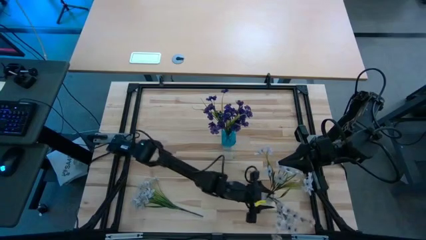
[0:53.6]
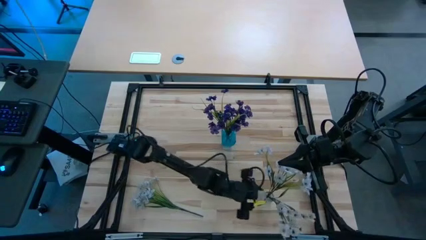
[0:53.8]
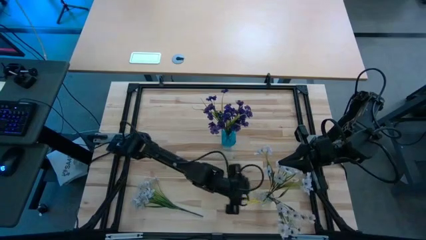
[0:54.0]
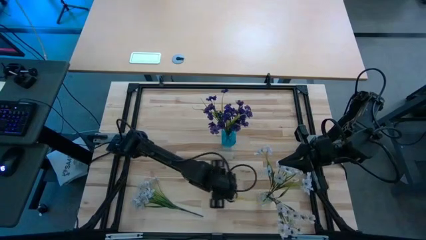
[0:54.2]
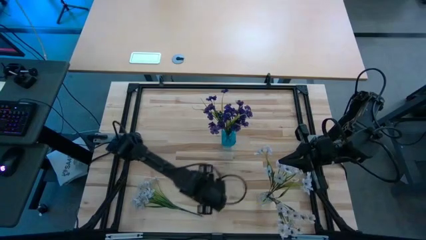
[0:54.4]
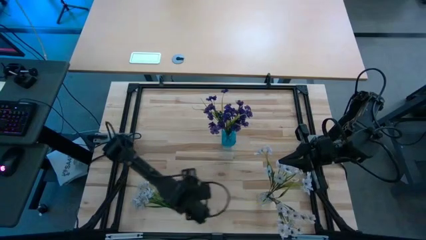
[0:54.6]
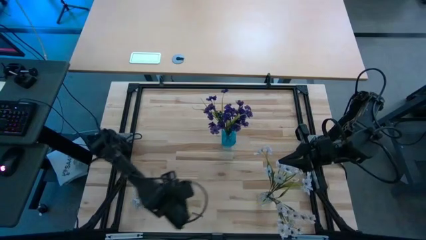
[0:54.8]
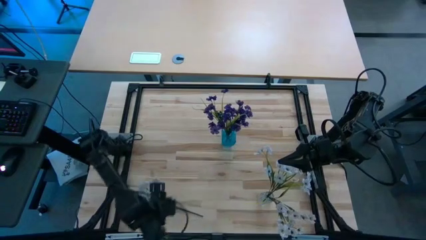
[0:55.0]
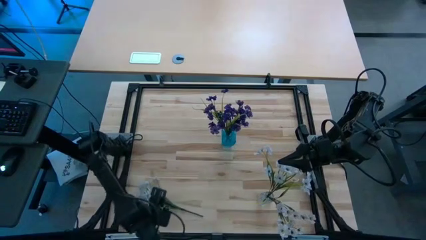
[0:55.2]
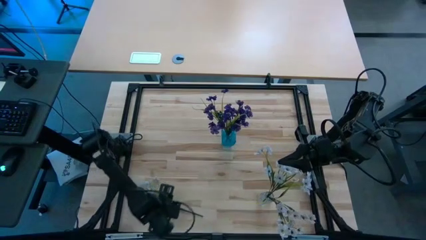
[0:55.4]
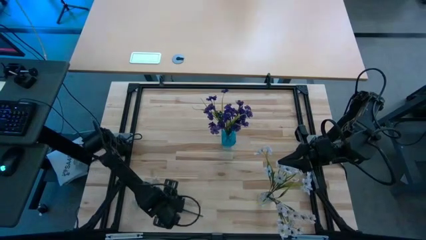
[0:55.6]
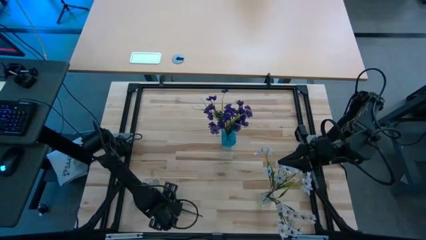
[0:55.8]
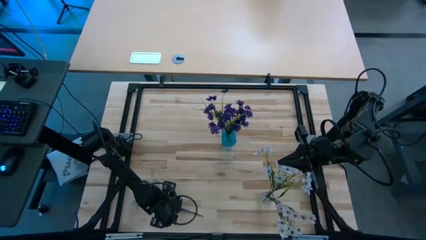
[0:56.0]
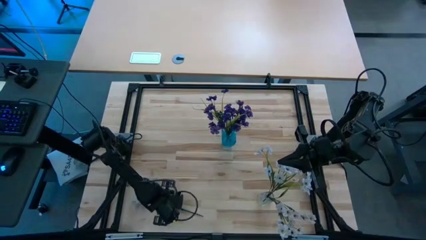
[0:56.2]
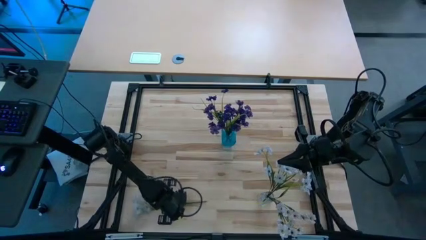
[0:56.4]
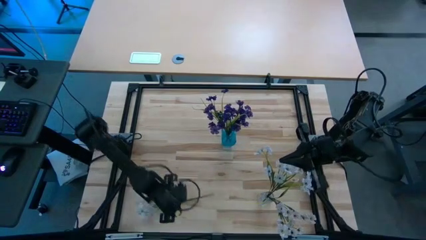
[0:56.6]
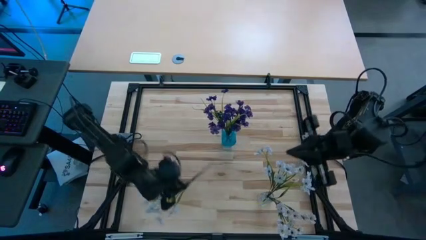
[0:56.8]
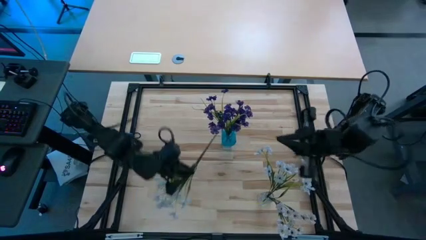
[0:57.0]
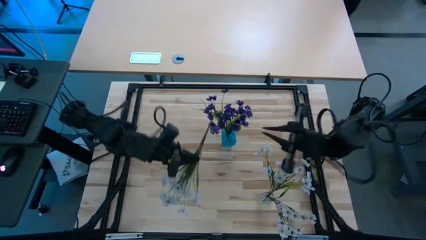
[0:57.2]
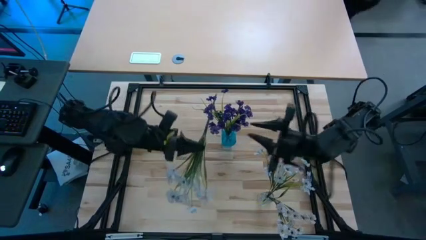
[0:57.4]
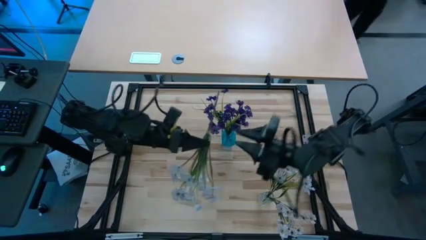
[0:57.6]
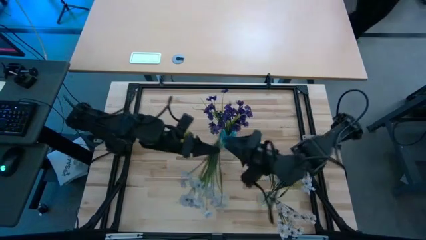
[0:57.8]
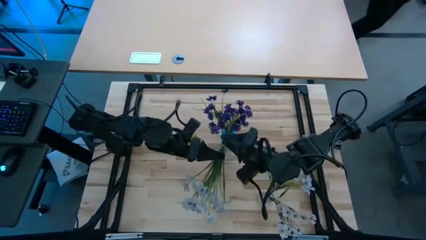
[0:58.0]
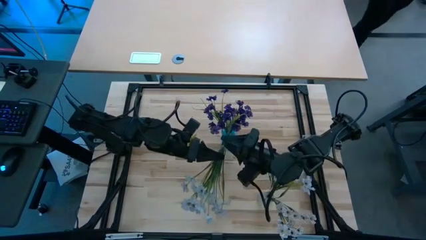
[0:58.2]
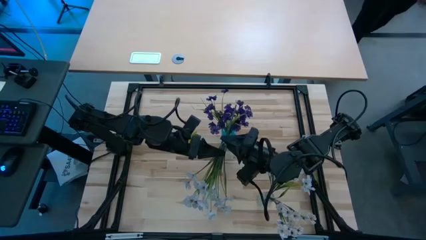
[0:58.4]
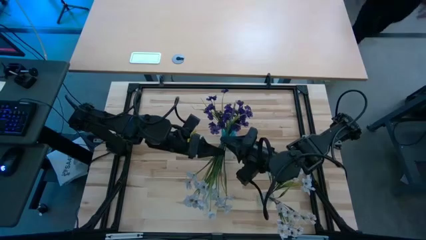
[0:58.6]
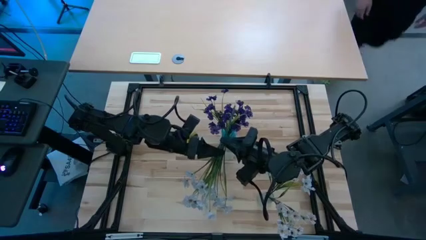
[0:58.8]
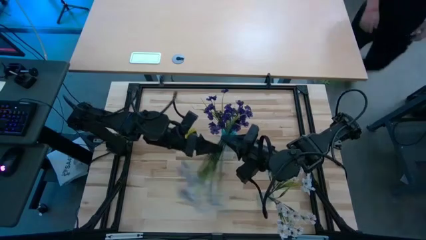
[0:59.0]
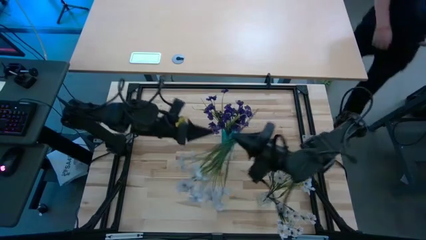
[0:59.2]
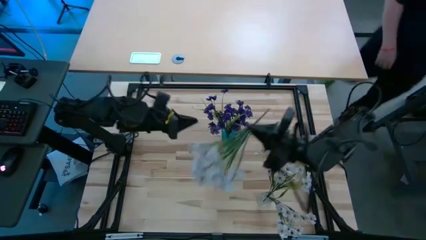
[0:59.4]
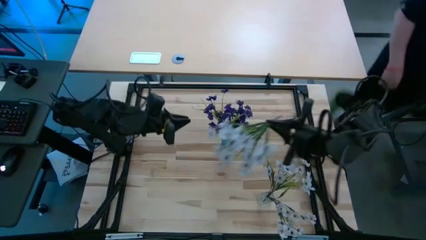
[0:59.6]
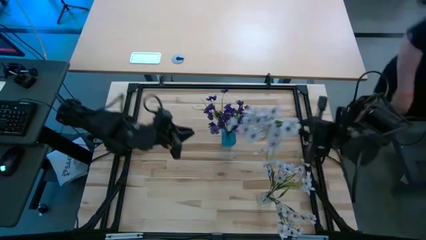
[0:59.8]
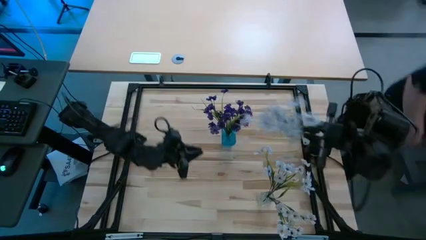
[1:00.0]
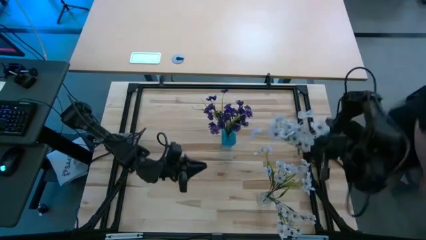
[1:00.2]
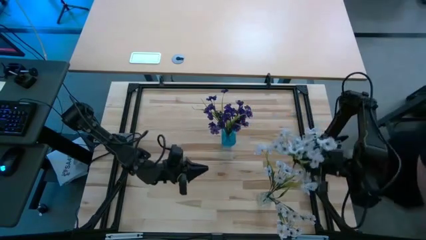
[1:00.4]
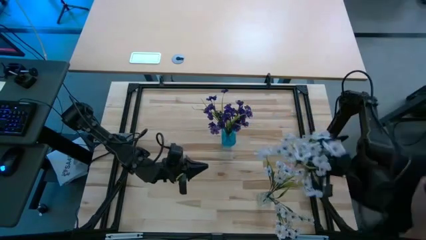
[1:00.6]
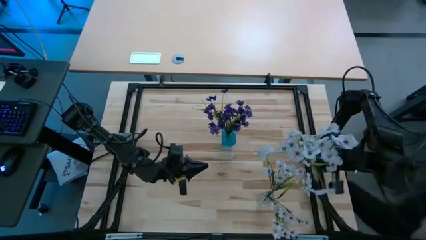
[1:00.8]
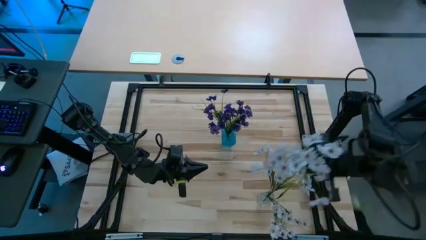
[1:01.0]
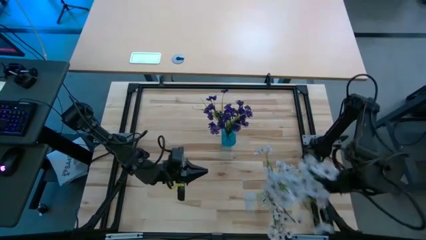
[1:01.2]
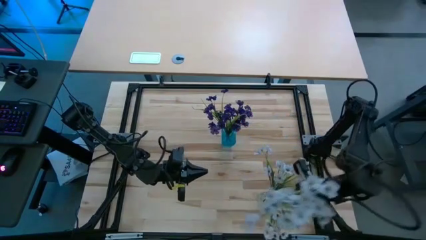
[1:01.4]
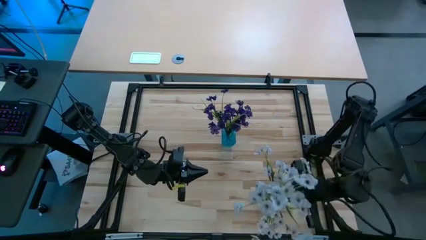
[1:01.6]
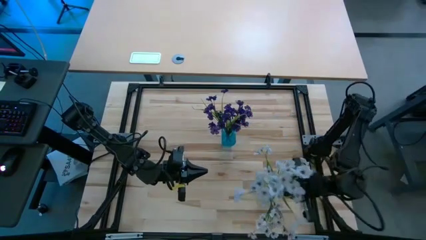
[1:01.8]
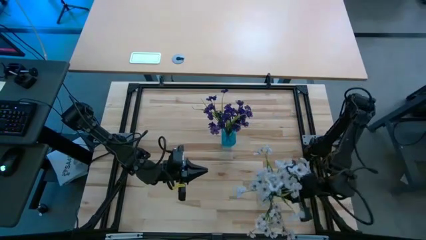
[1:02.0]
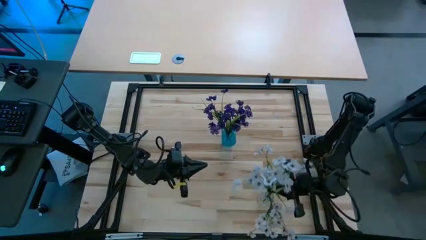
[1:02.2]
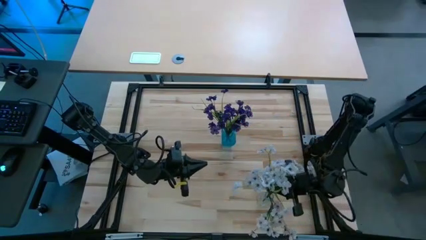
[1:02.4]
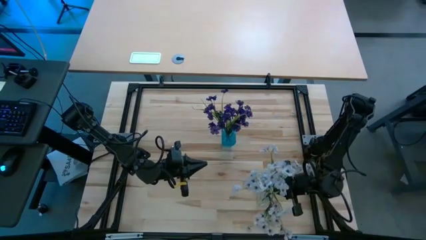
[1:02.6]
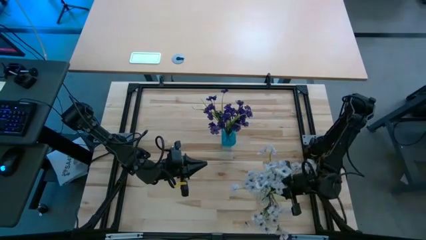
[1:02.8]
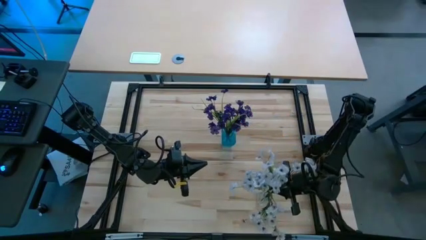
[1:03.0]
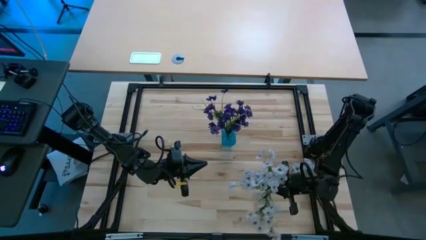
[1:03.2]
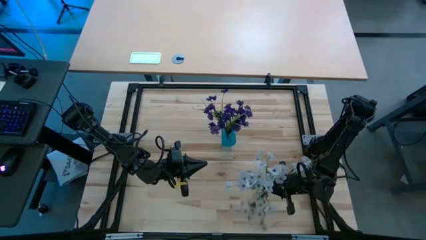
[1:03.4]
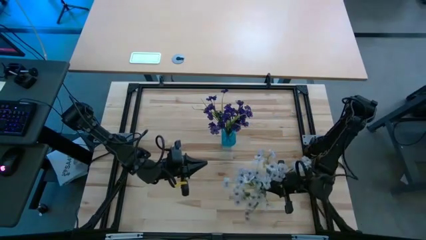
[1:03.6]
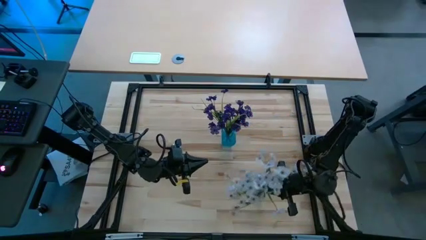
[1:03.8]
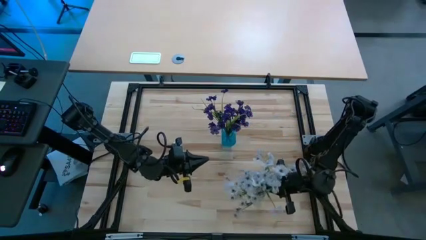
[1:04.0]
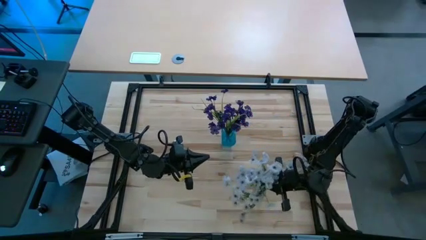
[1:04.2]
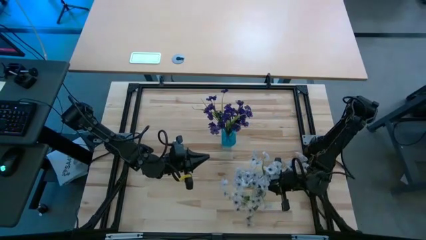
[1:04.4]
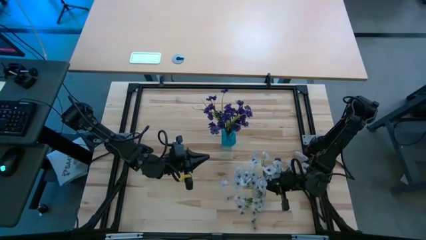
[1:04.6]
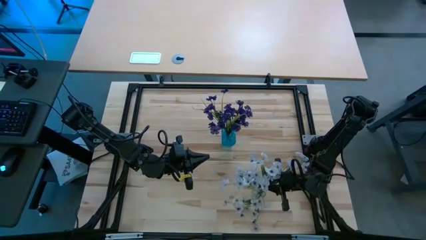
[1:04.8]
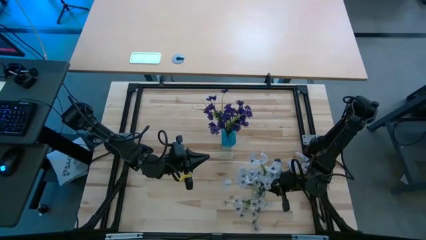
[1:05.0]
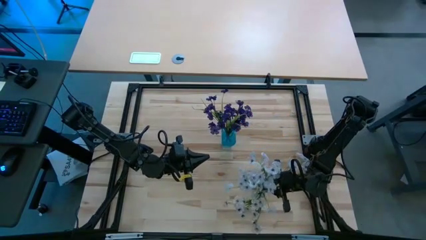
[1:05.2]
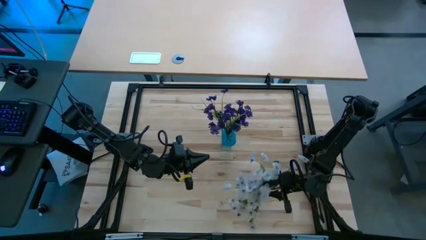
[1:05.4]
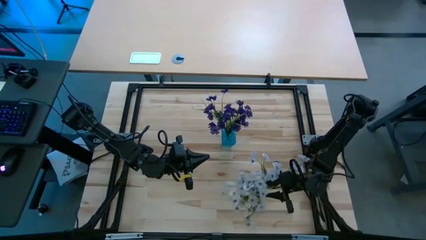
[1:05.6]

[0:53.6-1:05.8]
Task: Sort flowers into vase by color
Put the white flowers into the transparent crystal vase
